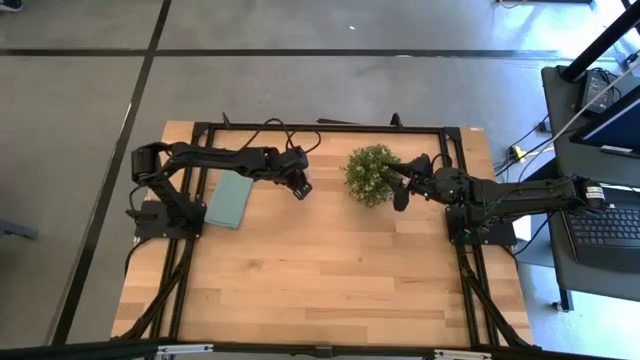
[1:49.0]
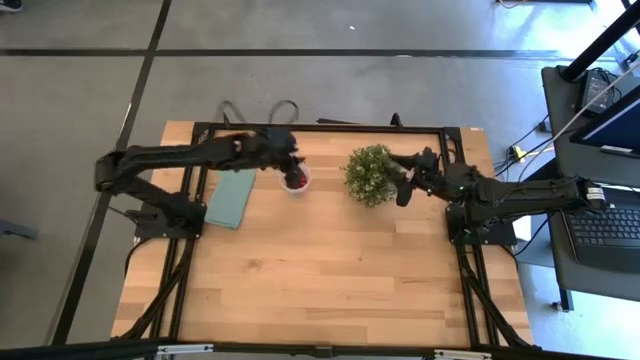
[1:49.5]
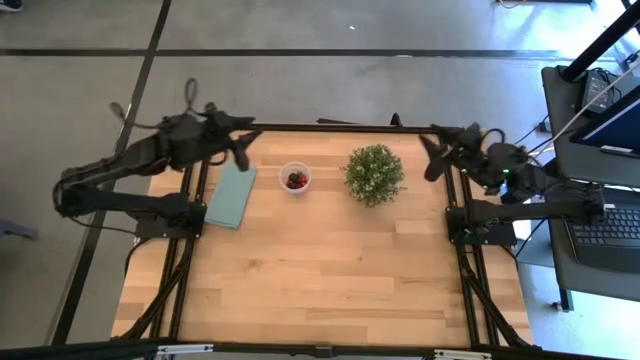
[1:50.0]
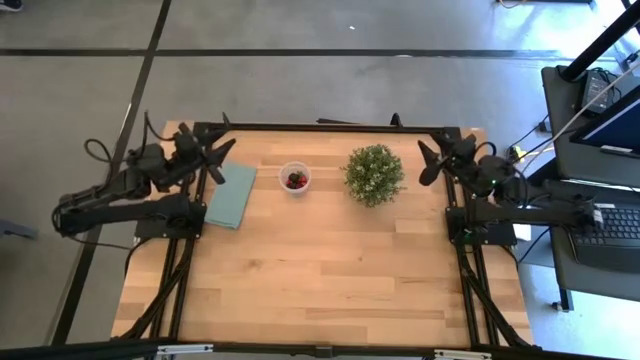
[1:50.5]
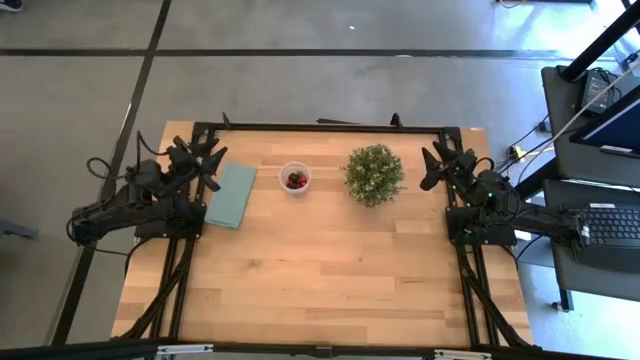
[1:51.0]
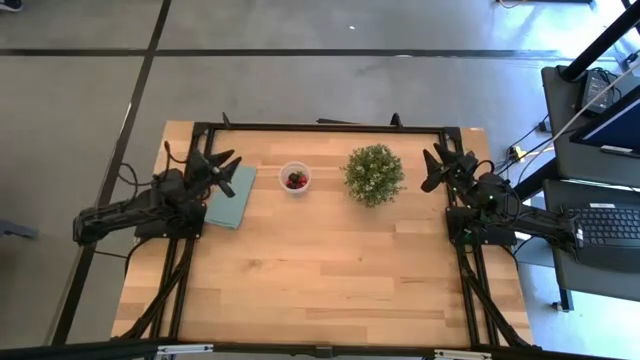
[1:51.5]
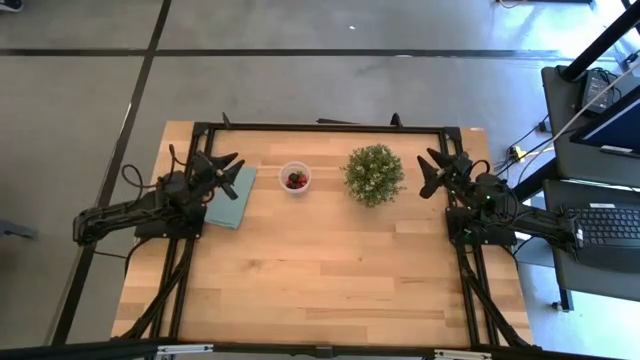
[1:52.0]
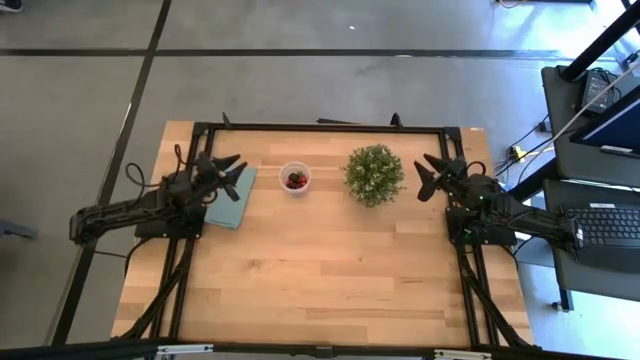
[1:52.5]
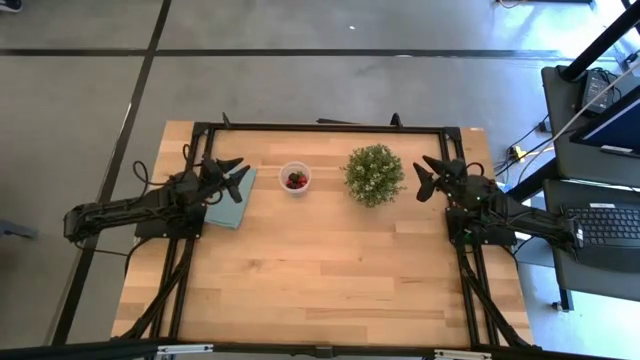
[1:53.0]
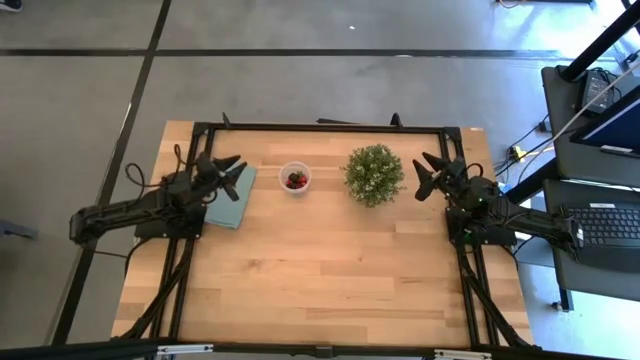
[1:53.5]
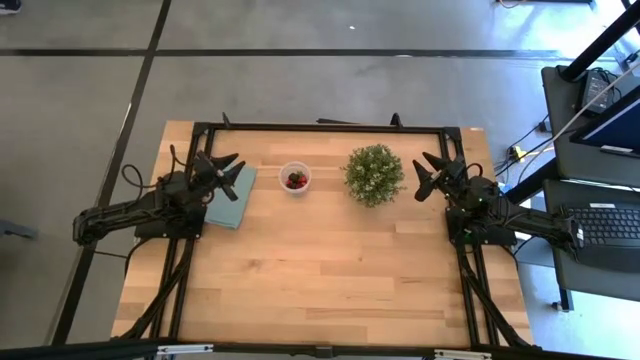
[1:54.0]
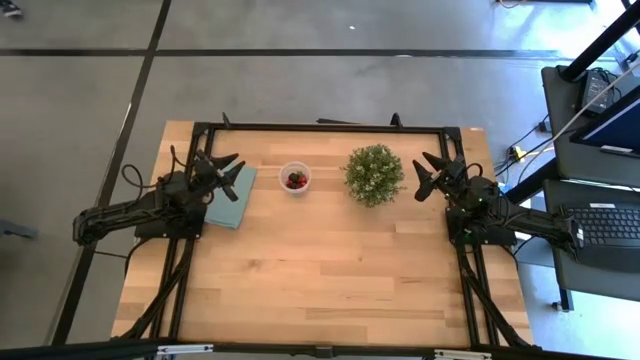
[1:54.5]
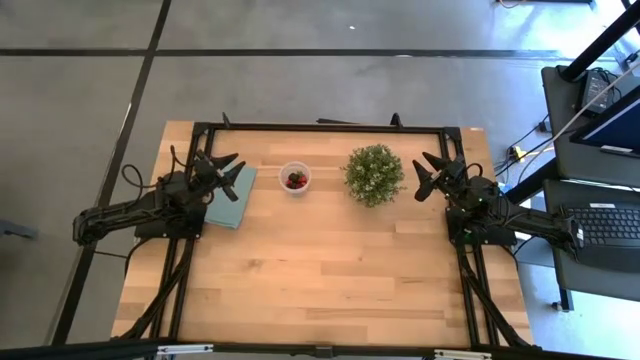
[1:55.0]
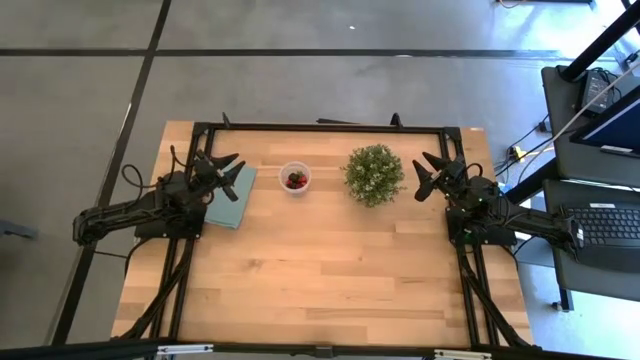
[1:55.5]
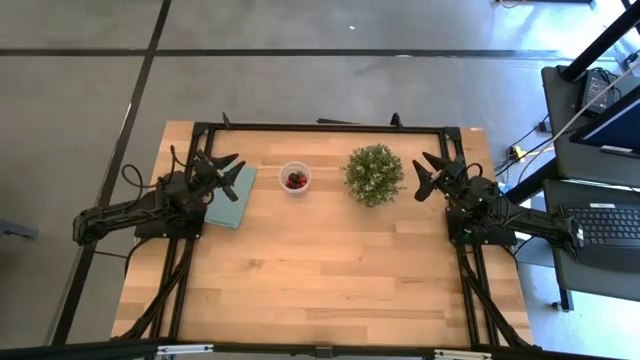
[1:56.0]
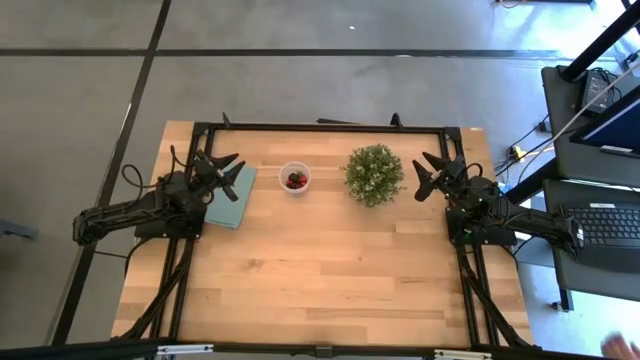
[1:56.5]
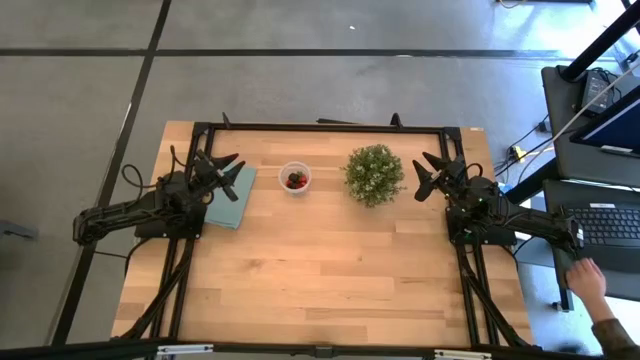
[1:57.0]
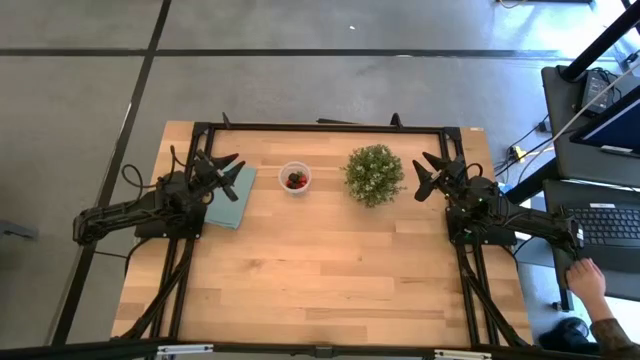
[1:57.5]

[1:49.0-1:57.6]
Task: Pick and placing Produce into tupperware
Return to Home Position

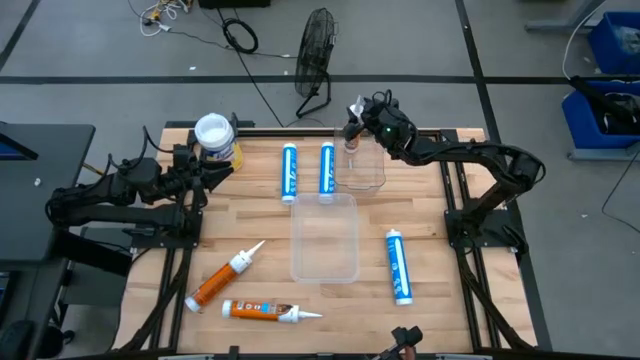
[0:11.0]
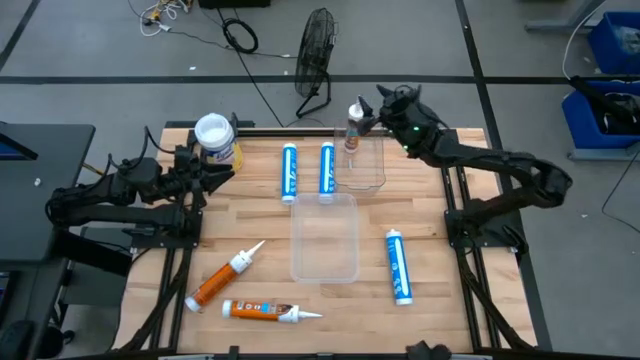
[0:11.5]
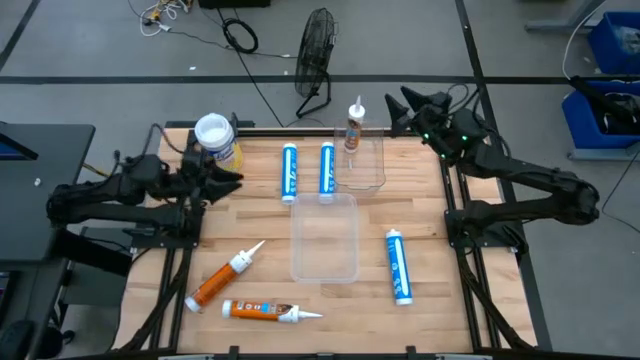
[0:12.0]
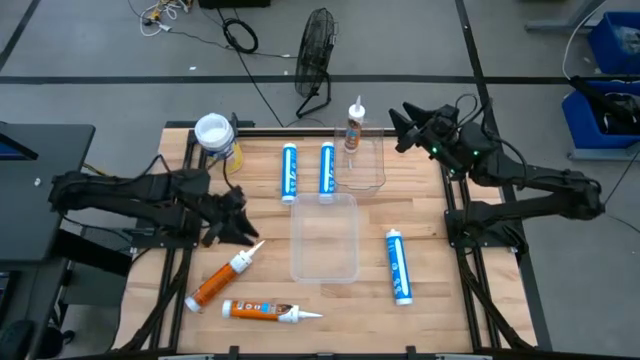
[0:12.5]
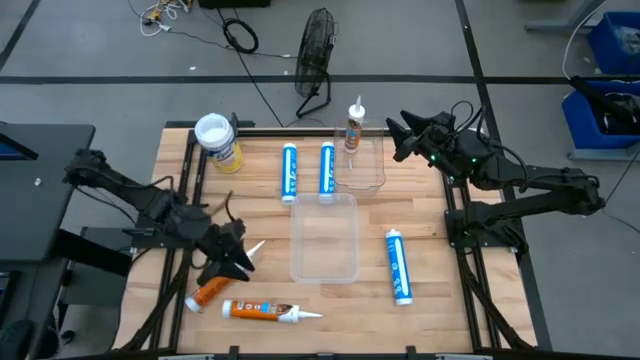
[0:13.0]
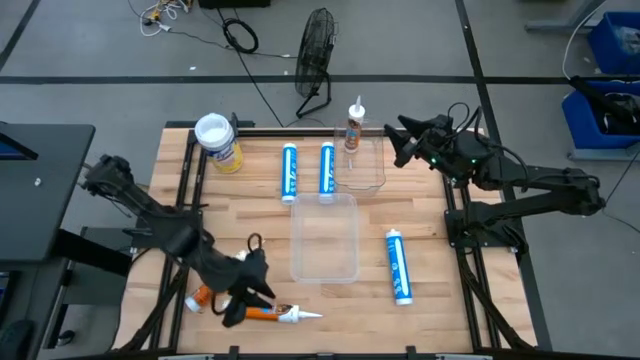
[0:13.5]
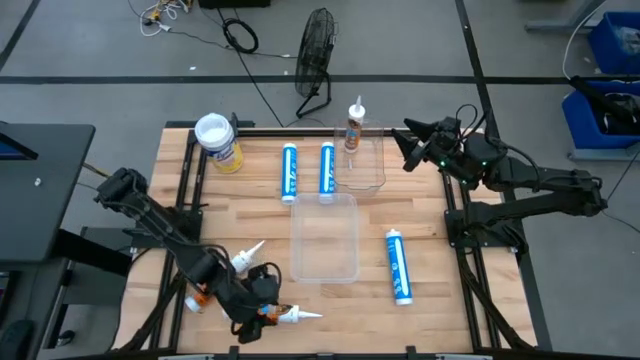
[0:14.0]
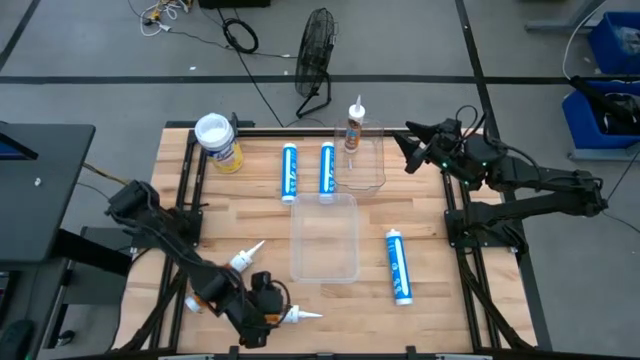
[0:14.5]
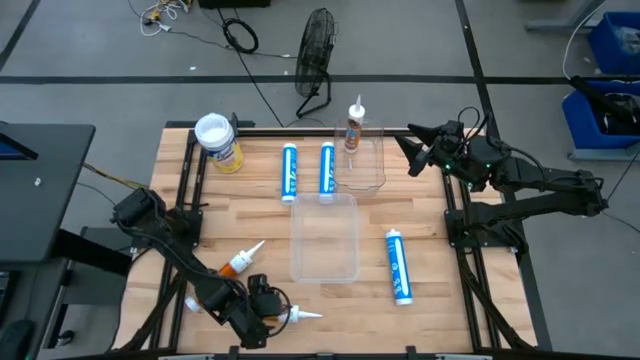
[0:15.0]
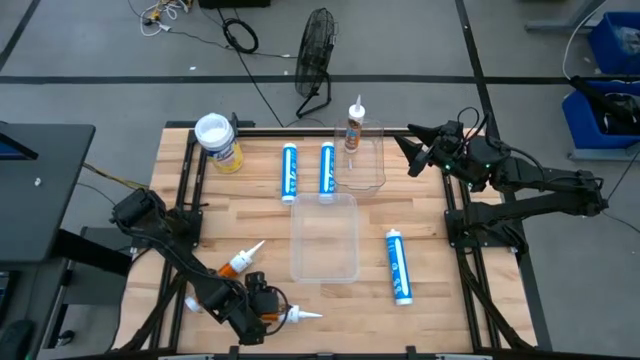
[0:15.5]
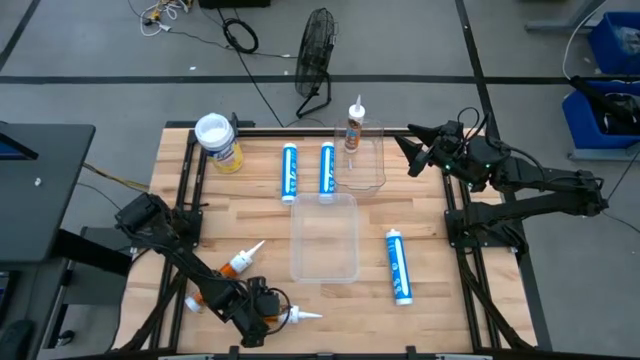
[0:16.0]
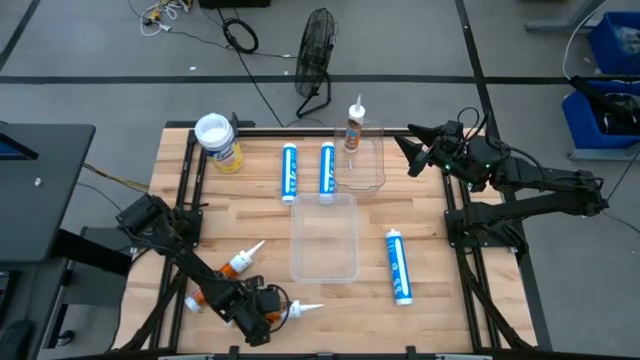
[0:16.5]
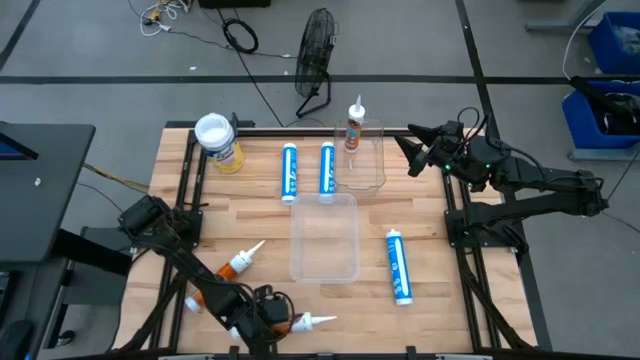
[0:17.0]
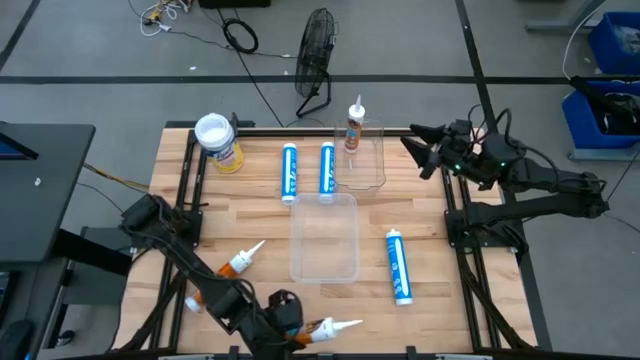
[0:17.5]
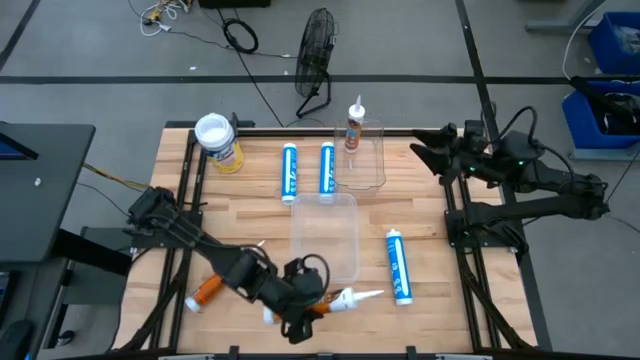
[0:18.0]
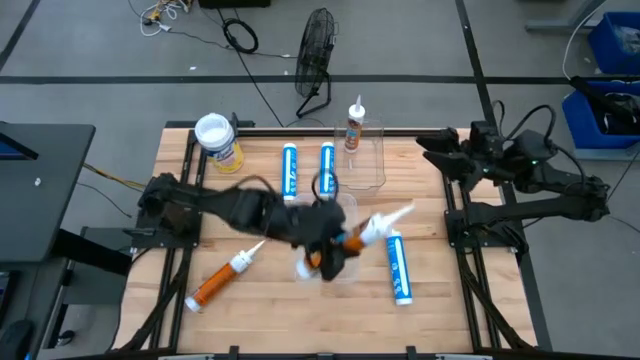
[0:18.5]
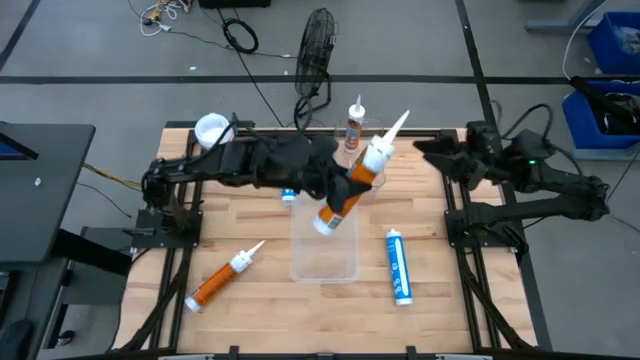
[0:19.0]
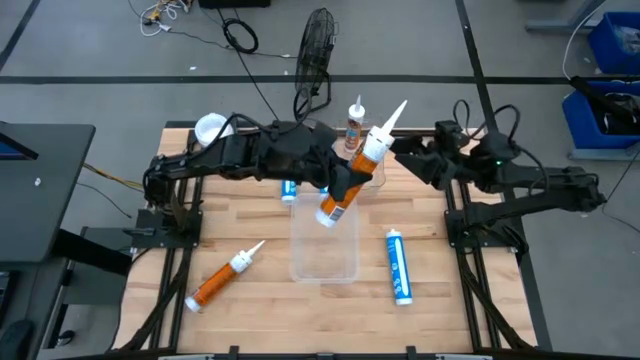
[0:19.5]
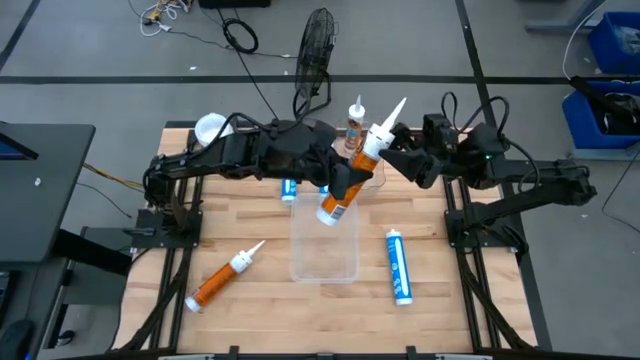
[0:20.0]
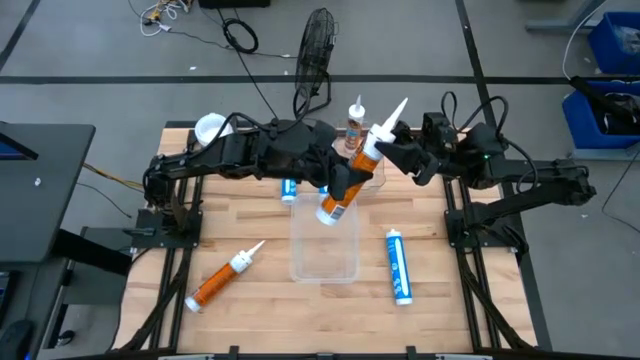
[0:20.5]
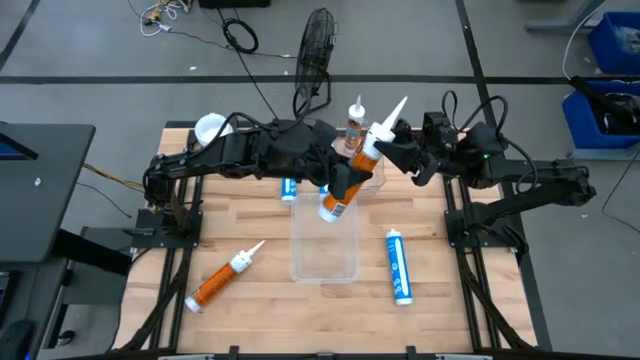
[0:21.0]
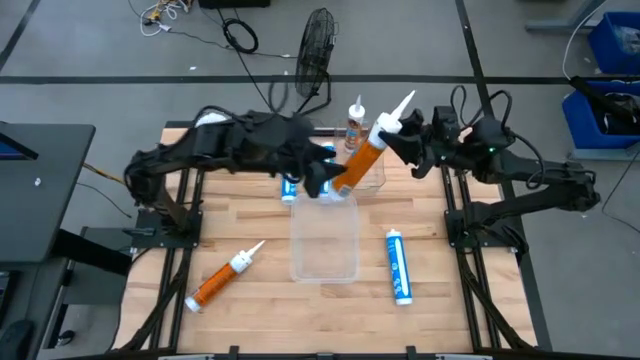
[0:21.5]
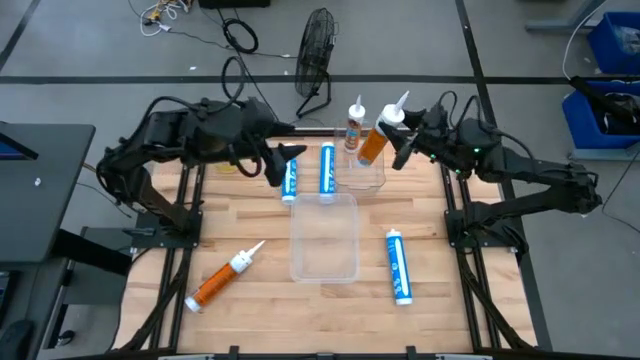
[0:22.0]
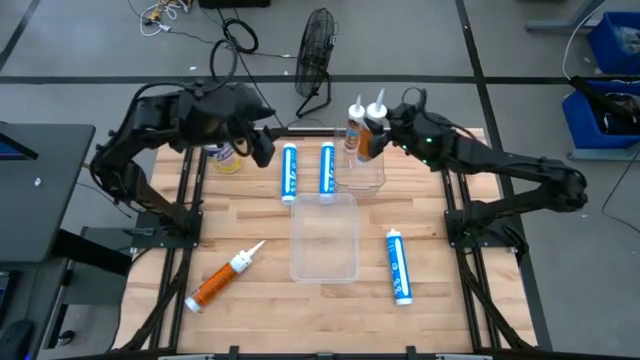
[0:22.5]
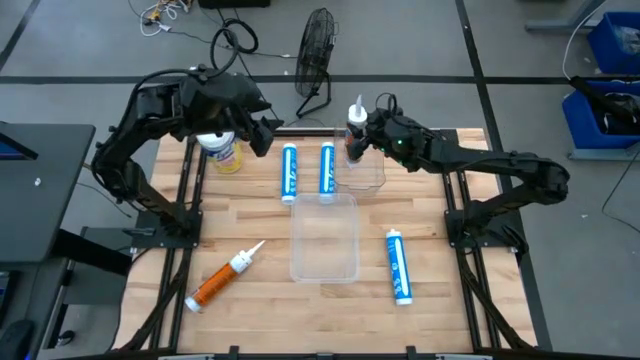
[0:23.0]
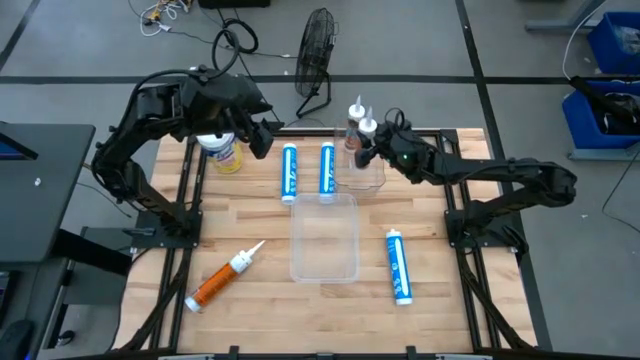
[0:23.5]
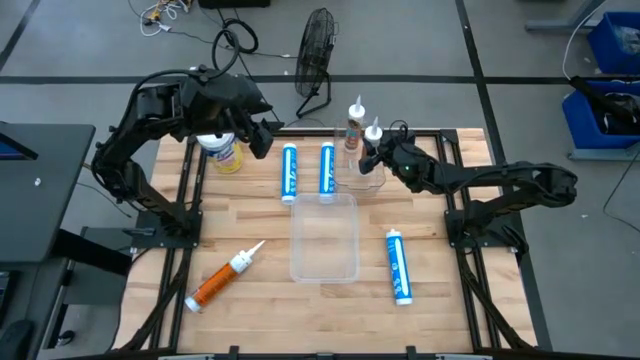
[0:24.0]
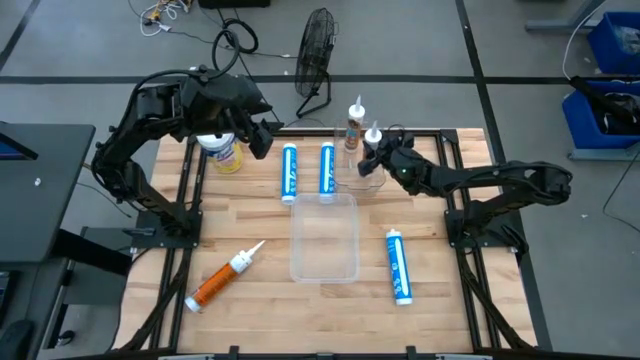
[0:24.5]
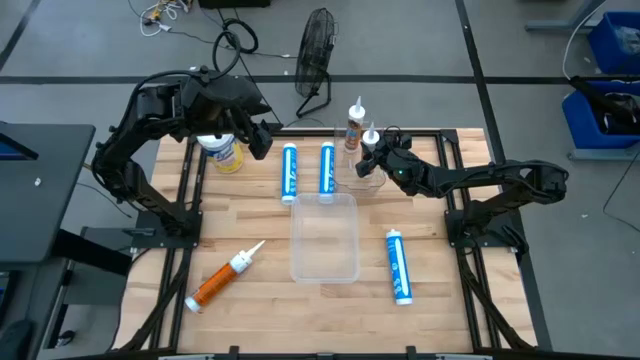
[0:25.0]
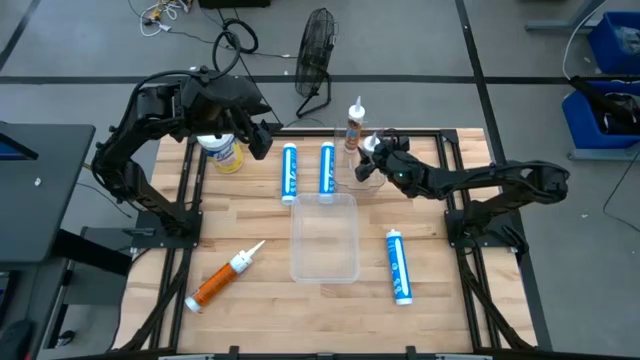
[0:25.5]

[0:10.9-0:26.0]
Task: Sort silicone sealant tubes
Put the right orange sealant into the top transparent bin
